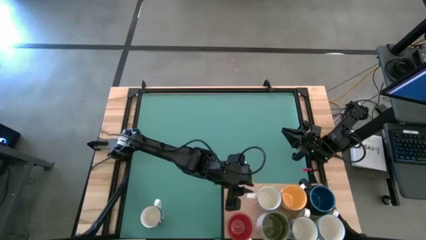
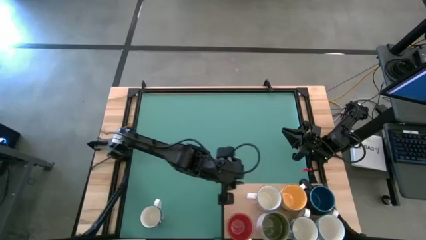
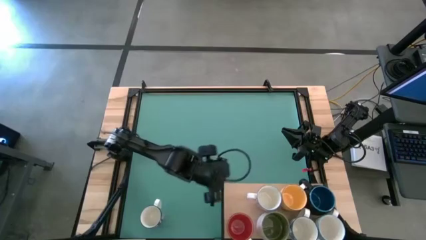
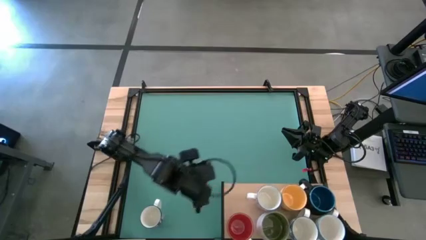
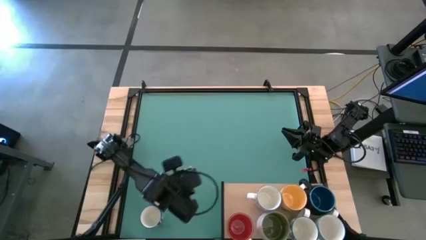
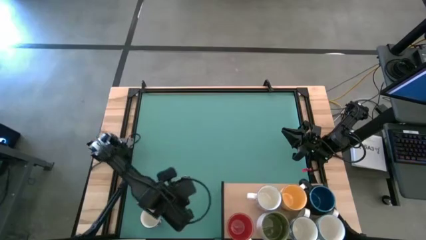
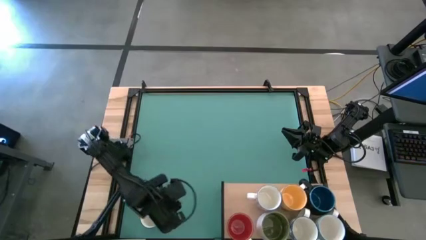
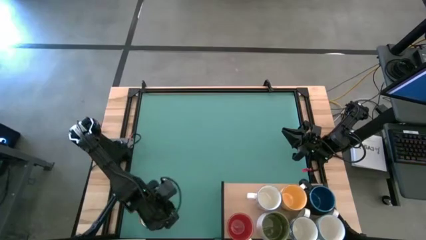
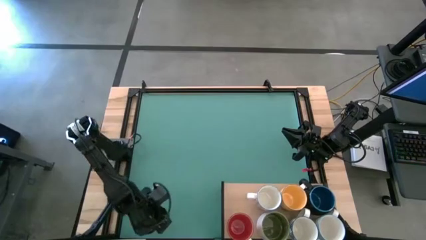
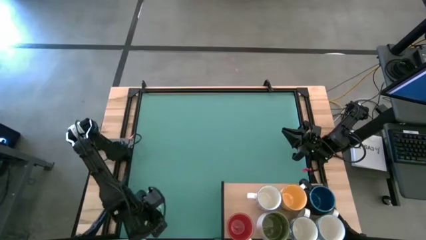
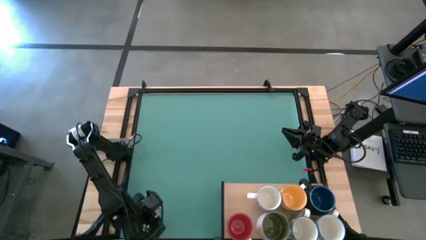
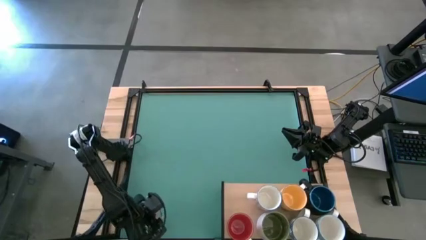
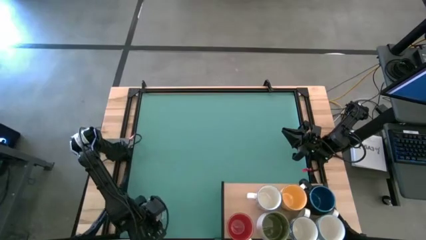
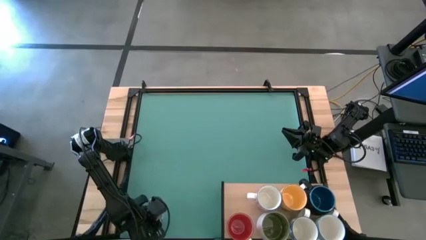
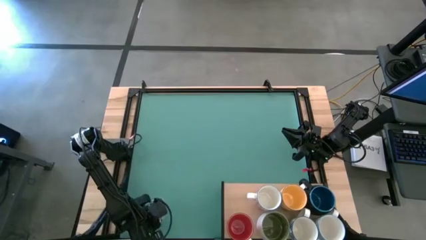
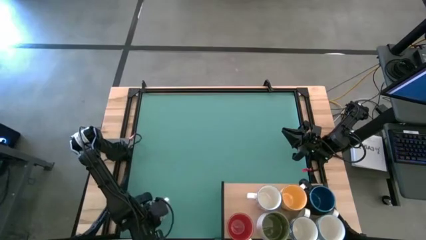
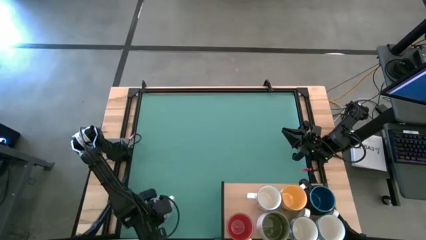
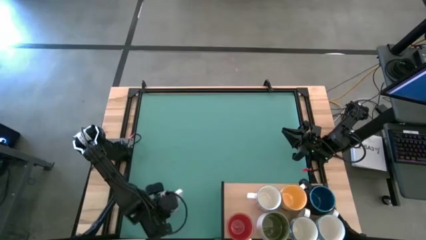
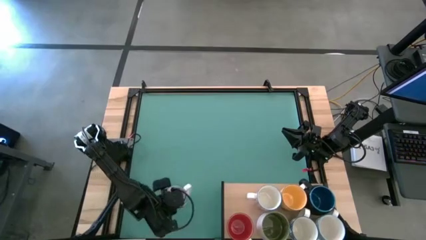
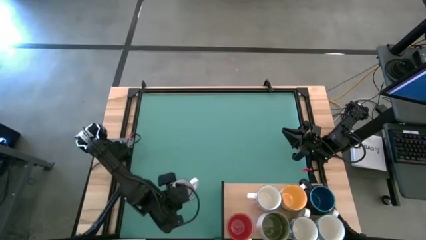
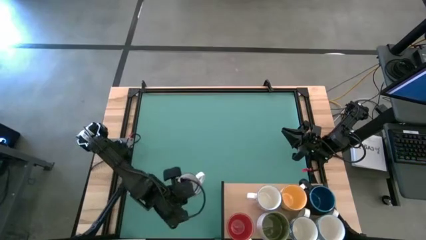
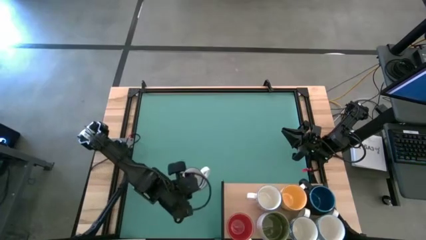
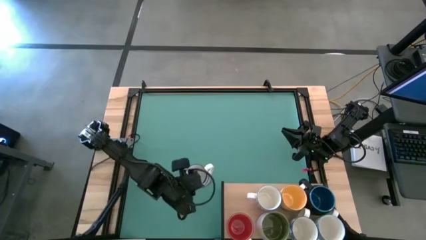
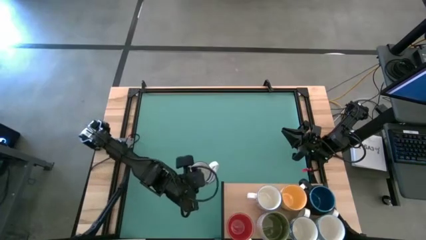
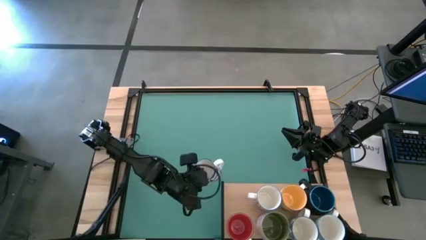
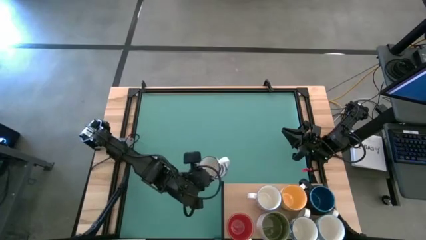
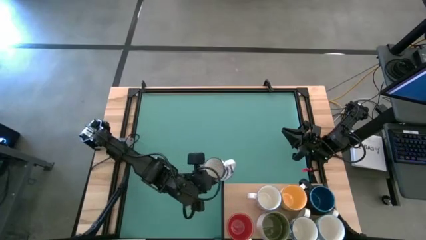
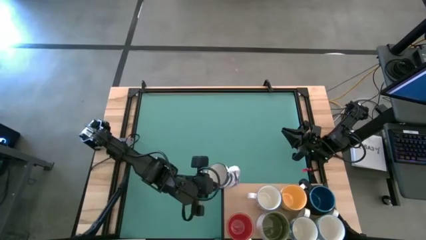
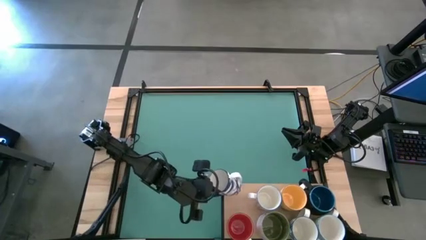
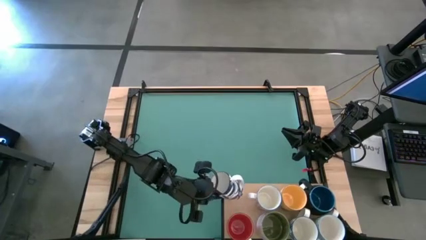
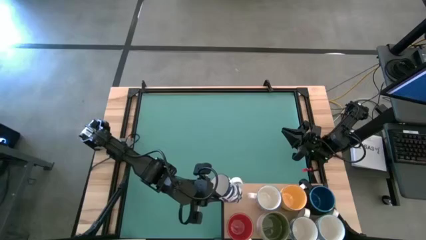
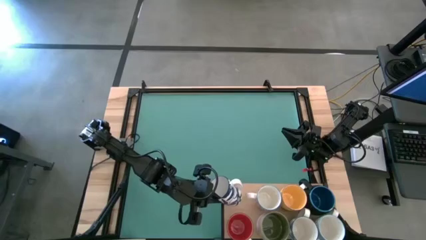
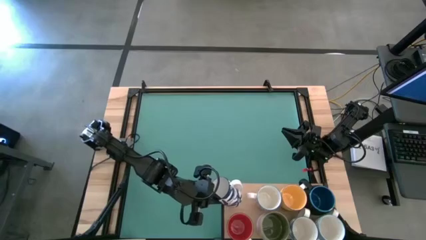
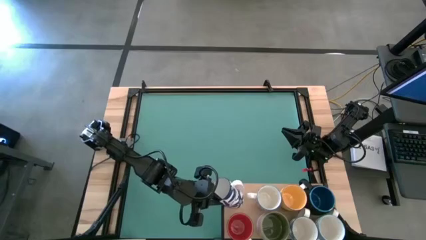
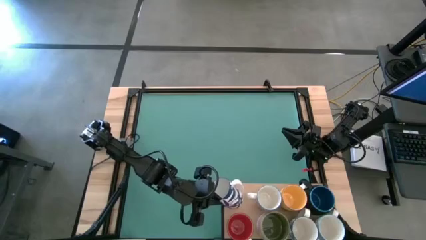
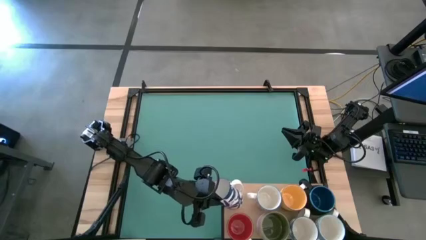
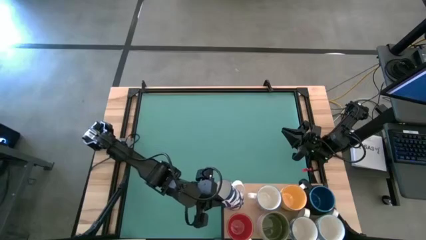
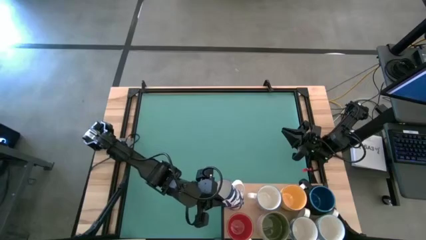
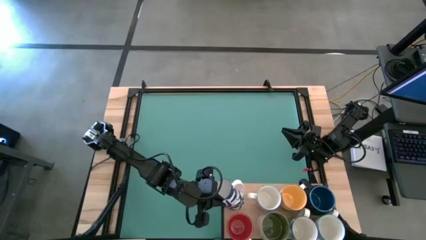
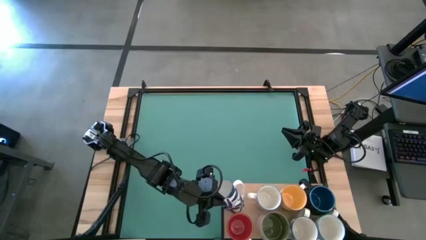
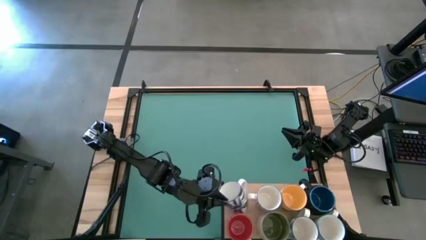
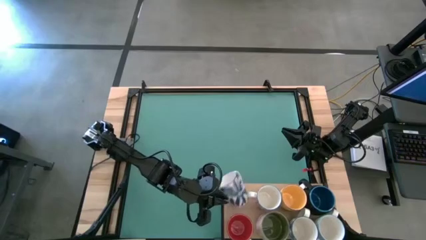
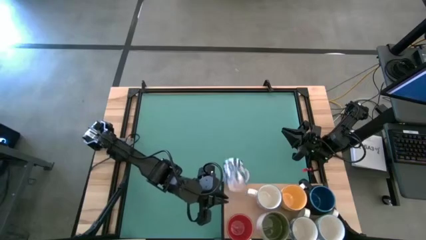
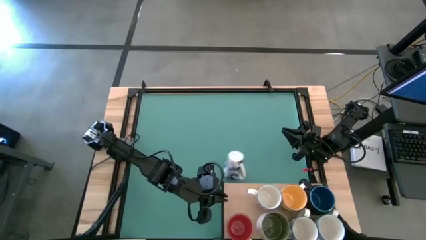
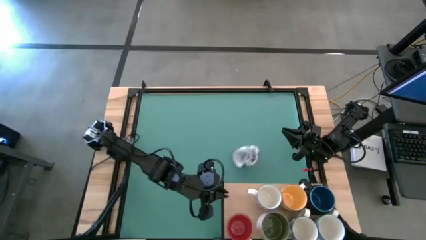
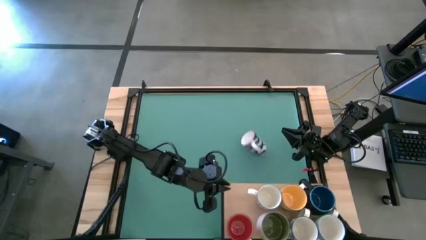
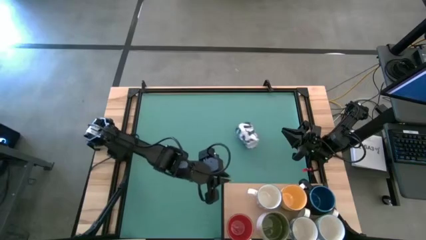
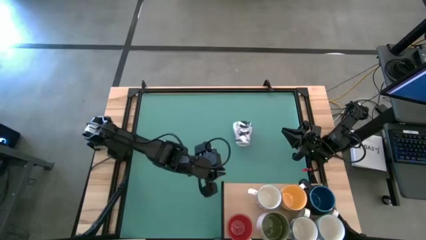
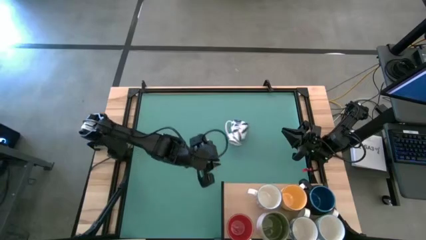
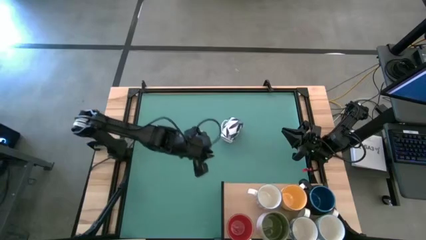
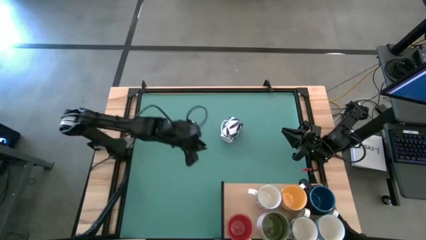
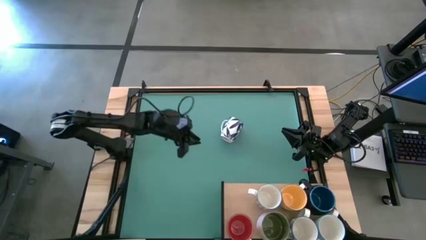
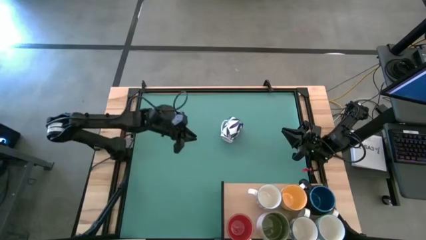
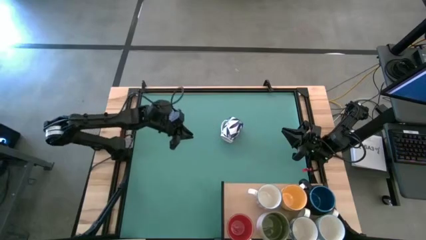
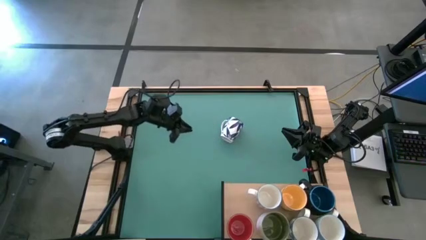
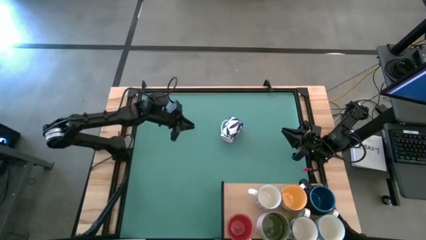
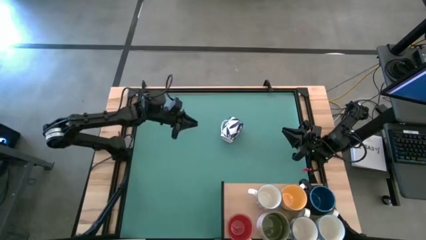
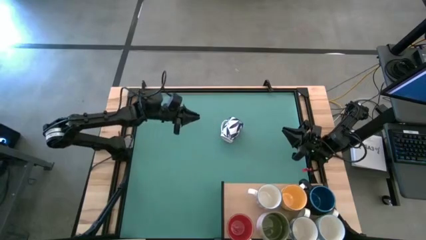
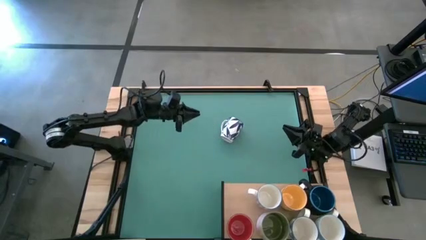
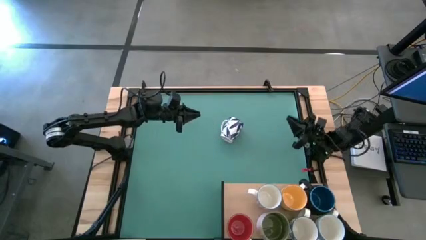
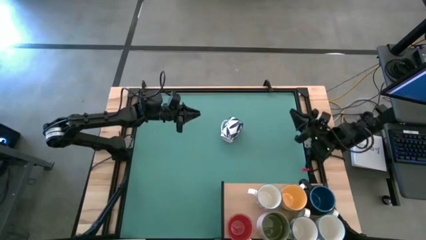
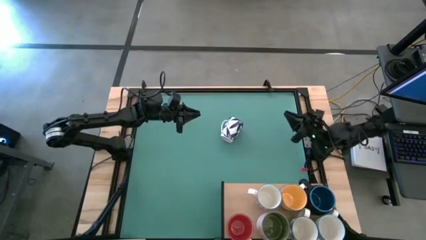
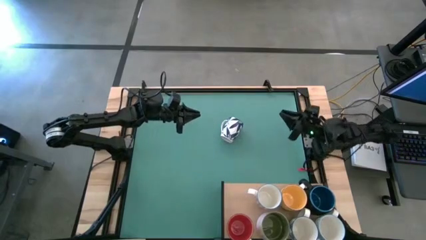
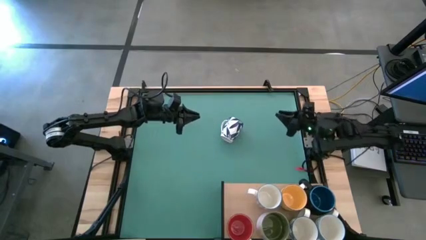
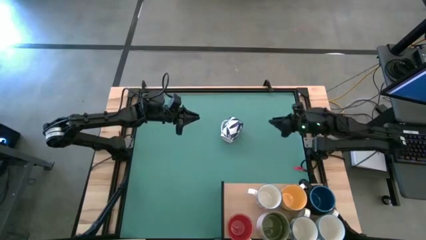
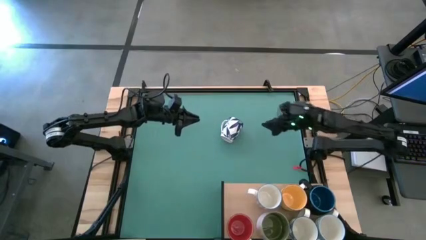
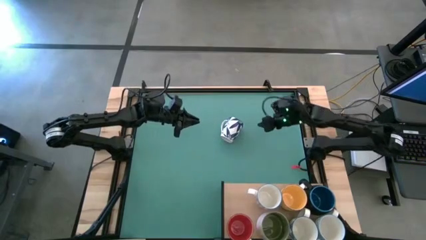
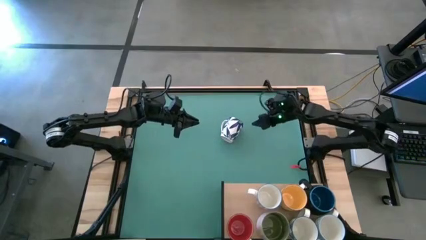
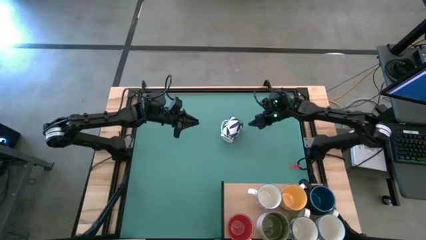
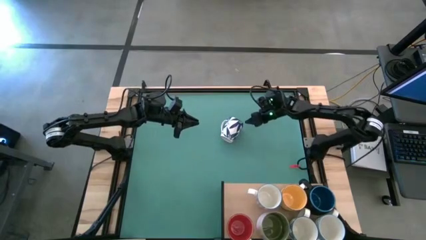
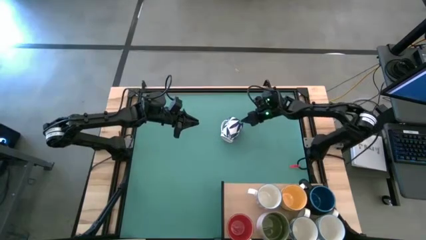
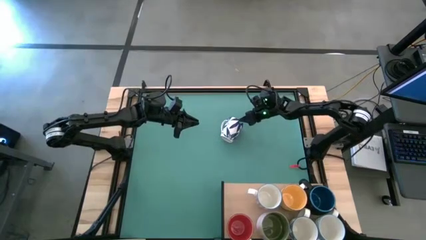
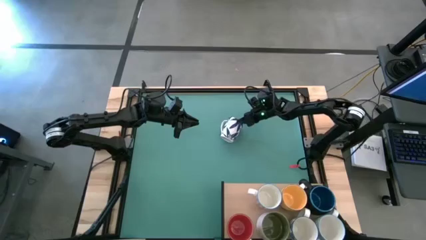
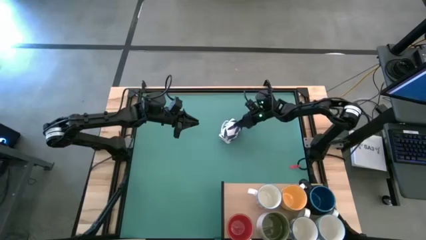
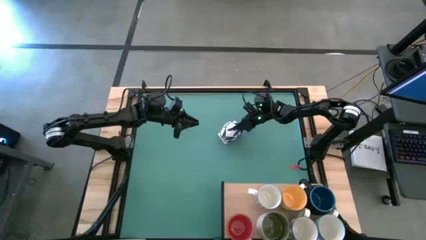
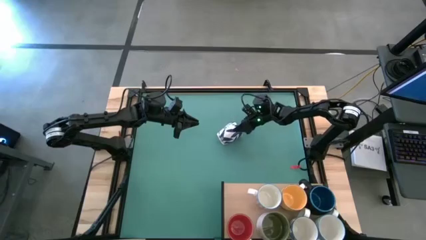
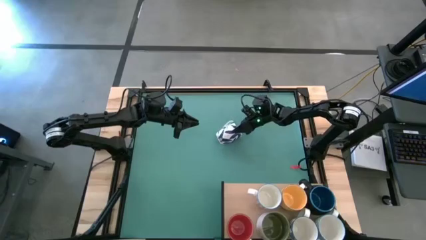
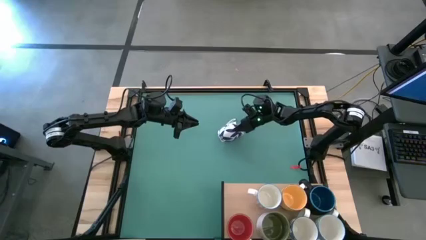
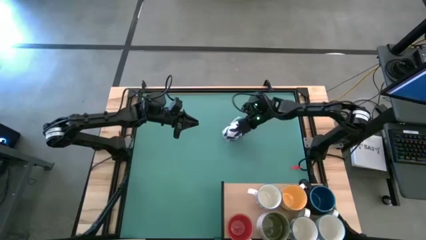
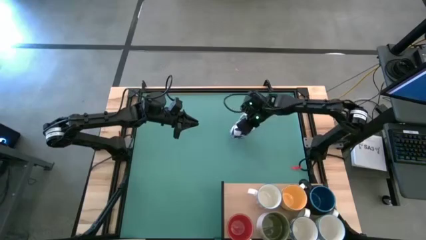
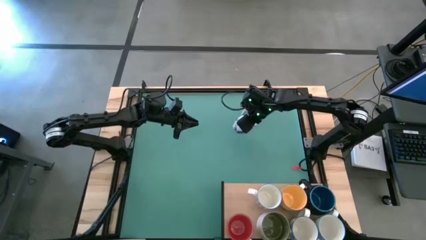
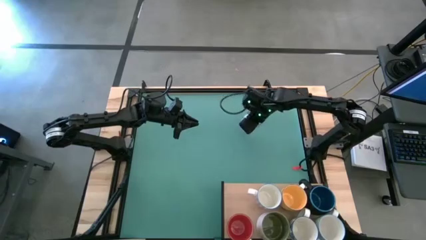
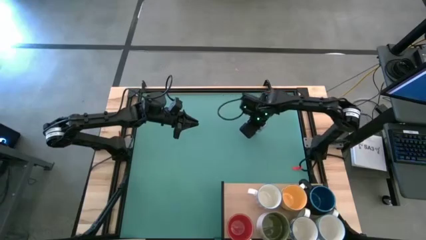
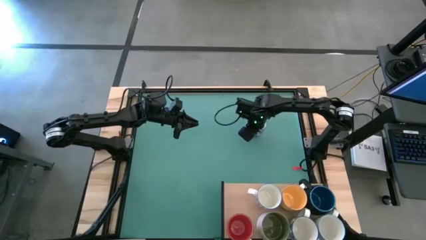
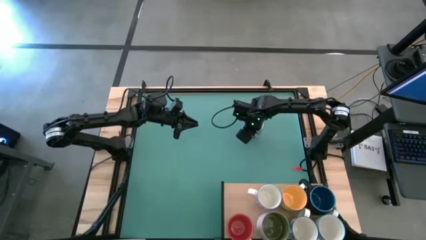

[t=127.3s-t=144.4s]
Task: Place coffee mugs
Put the blue mug on the shelf
